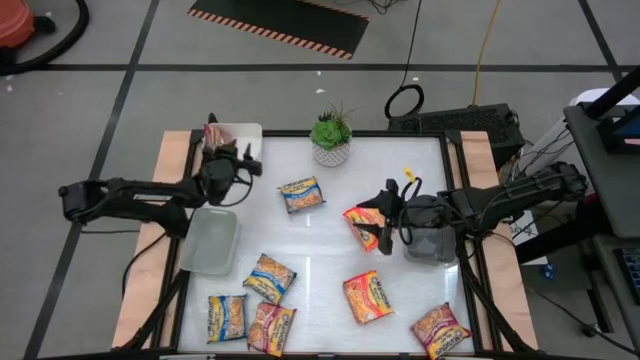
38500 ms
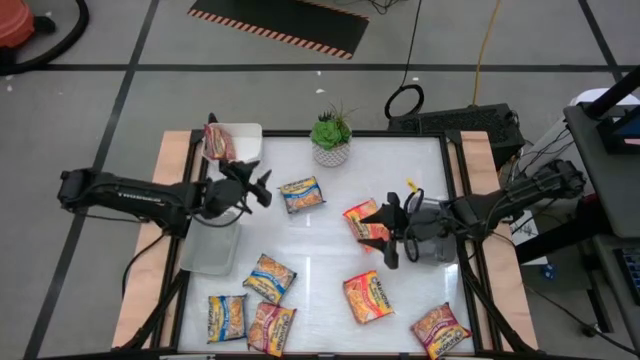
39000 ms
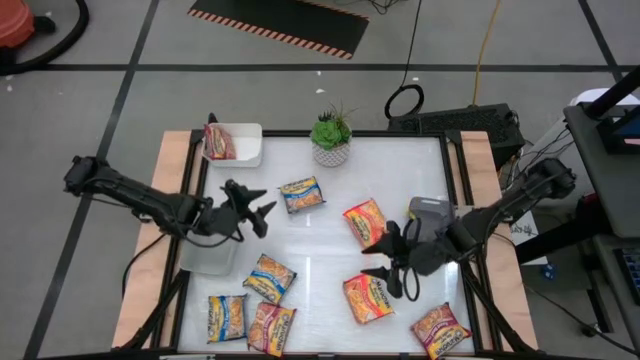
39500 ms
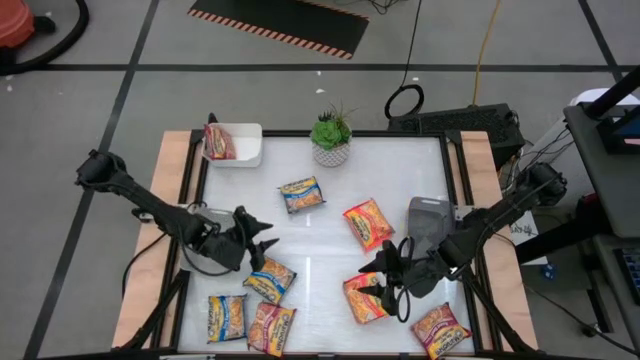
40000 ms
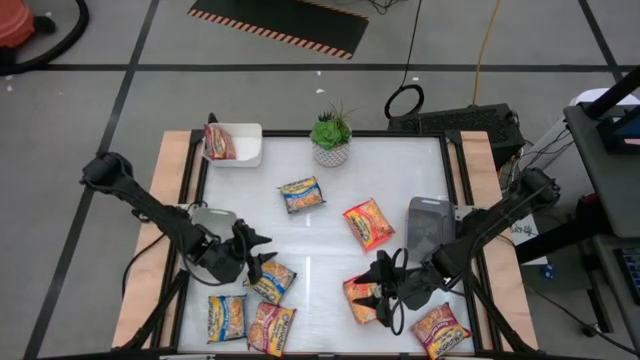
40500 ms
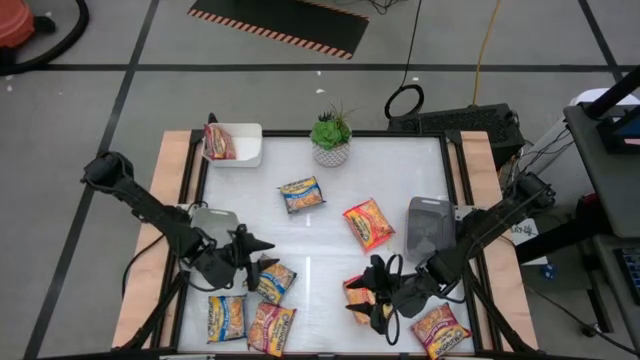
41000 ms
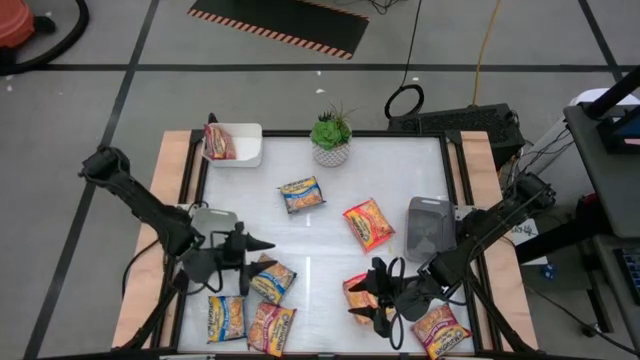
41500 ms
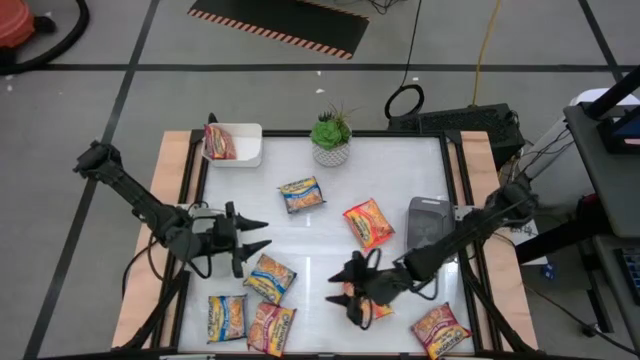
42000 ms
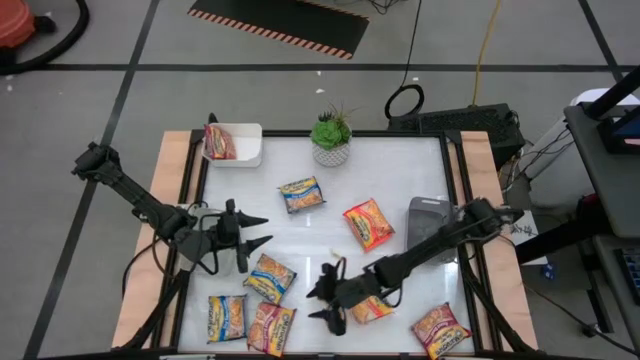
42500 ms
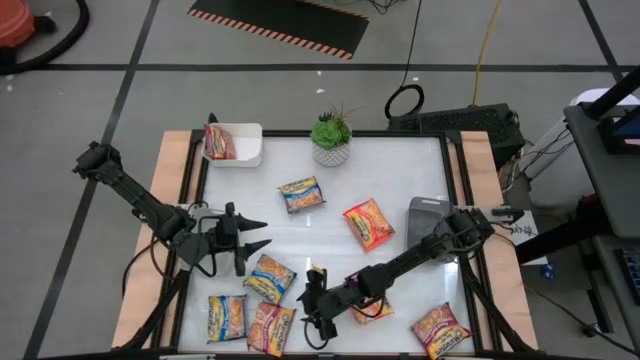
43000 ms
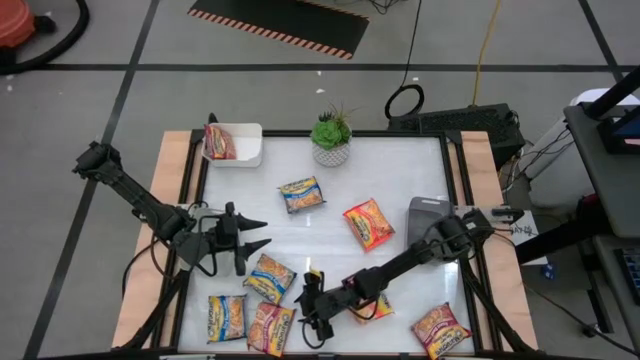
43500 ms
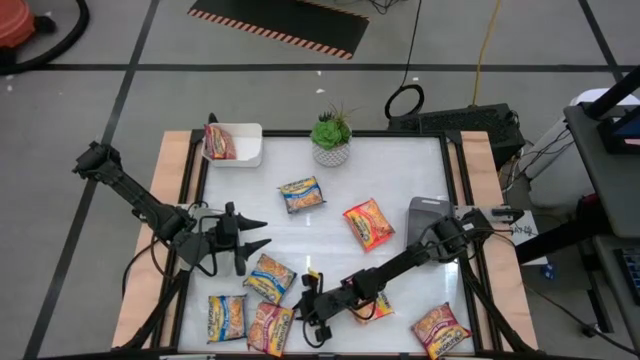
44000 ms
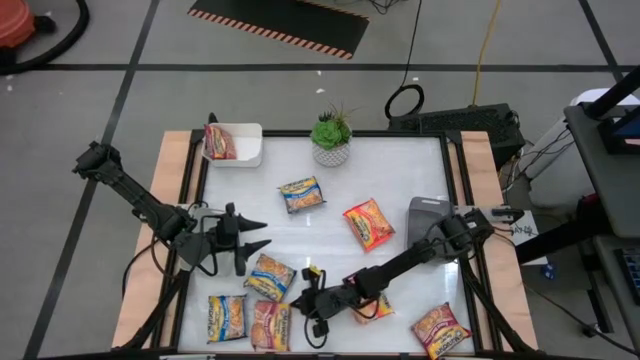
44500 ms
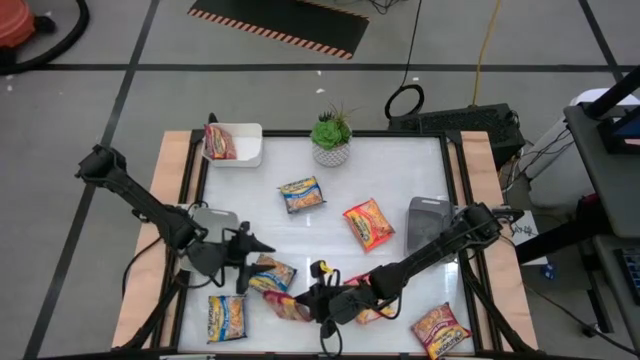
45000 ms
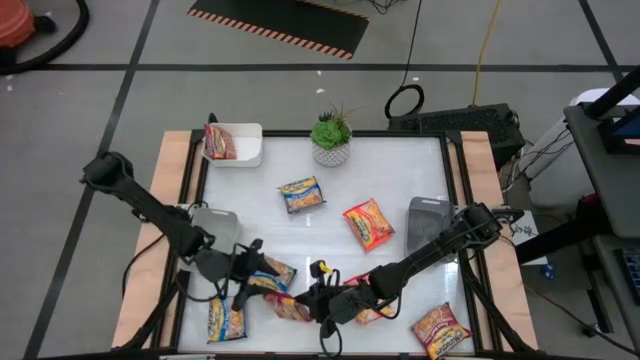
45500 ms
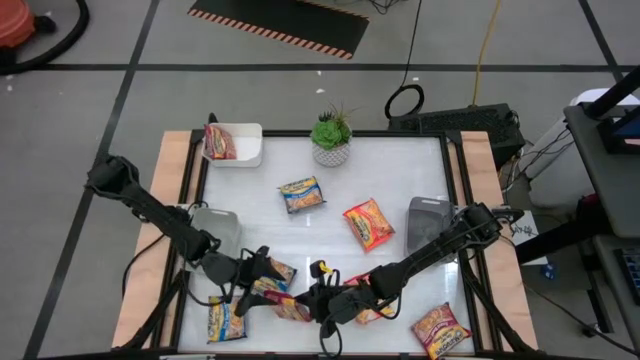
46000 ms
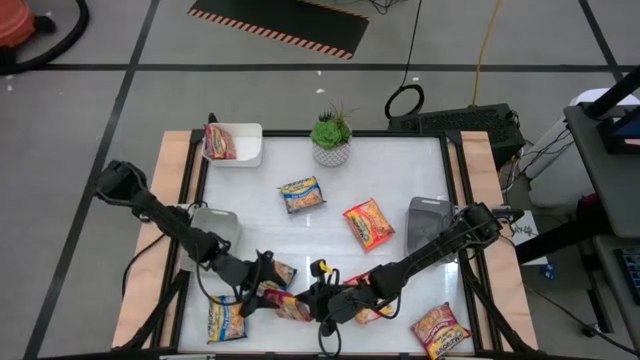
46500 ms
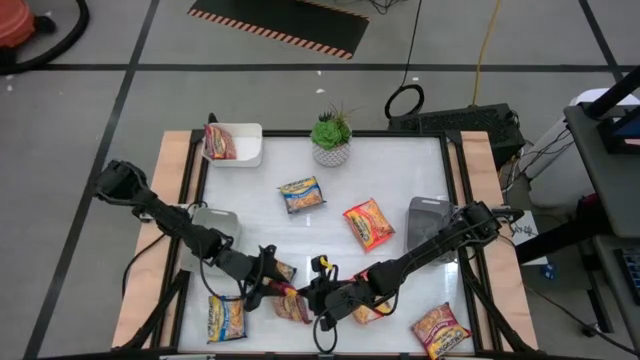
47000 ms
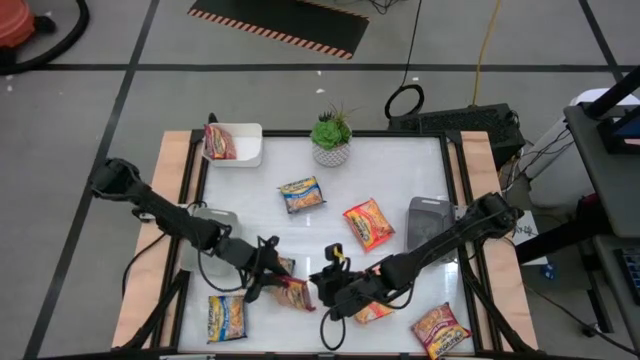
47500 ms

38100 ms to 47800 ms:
Task: Sort Maruchan noodles
Put the left red noodle pack into the white bin

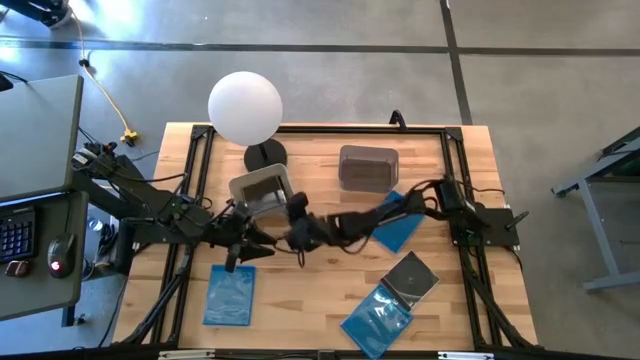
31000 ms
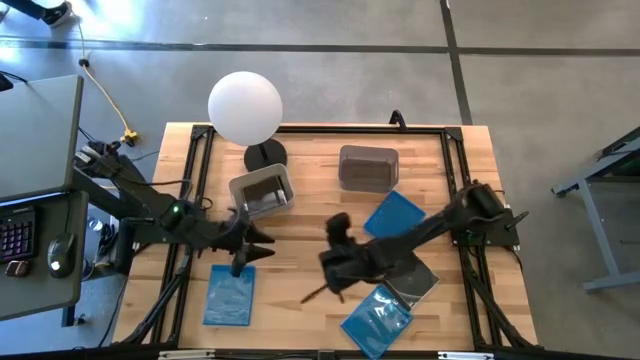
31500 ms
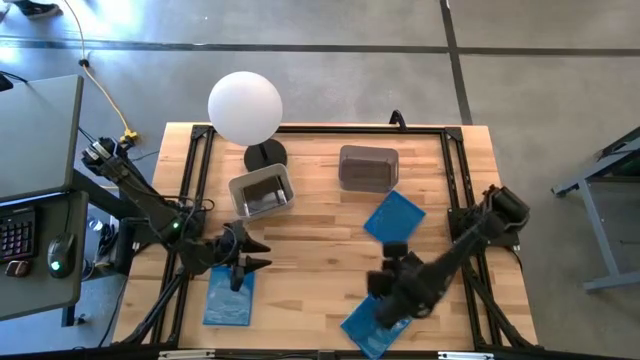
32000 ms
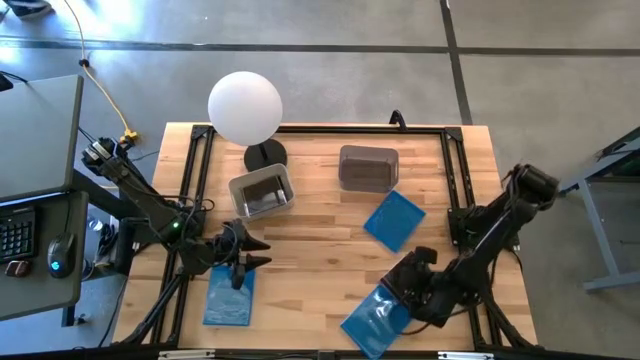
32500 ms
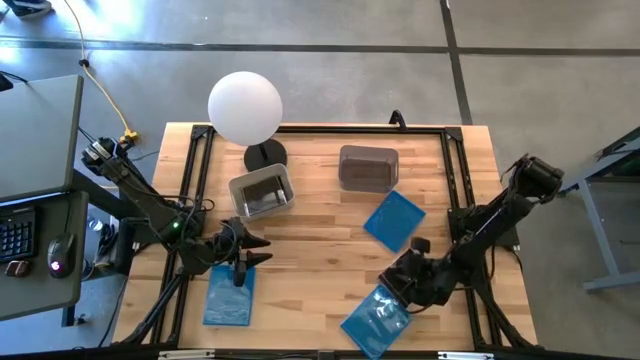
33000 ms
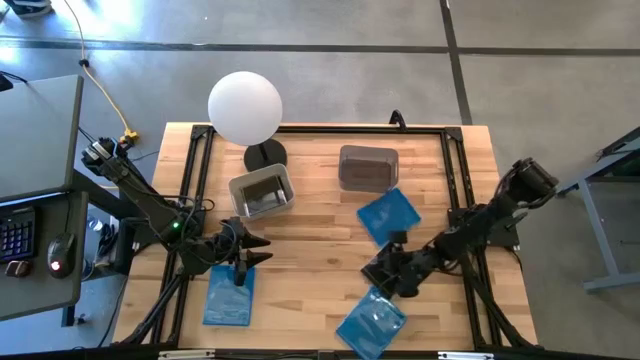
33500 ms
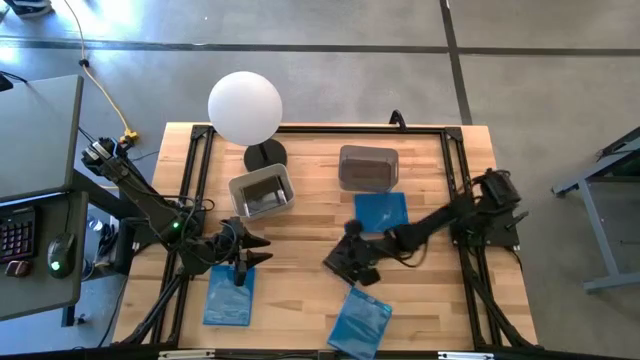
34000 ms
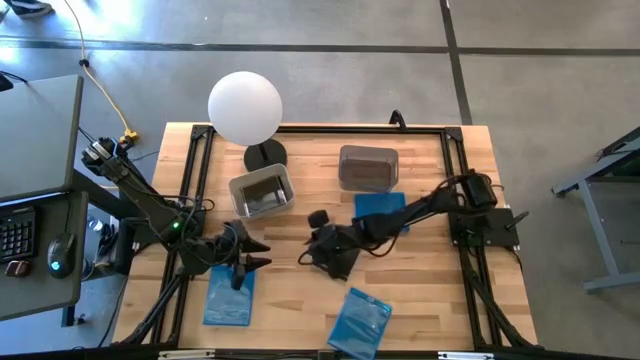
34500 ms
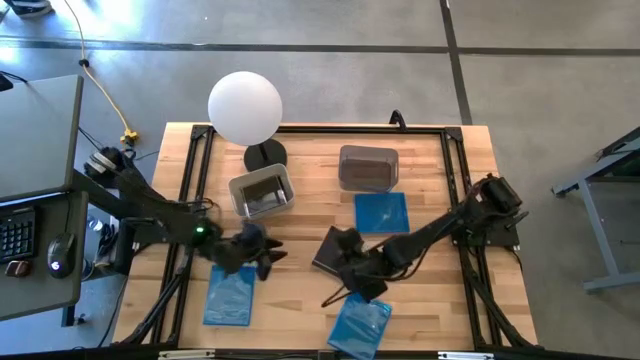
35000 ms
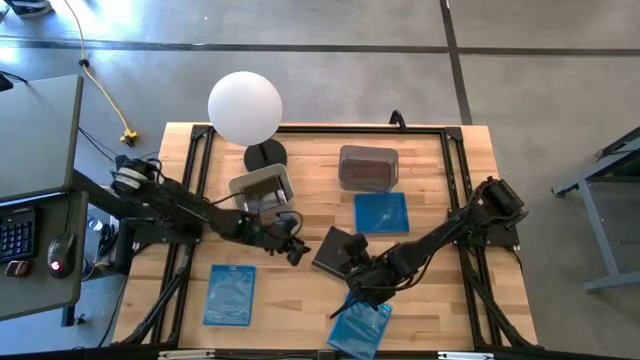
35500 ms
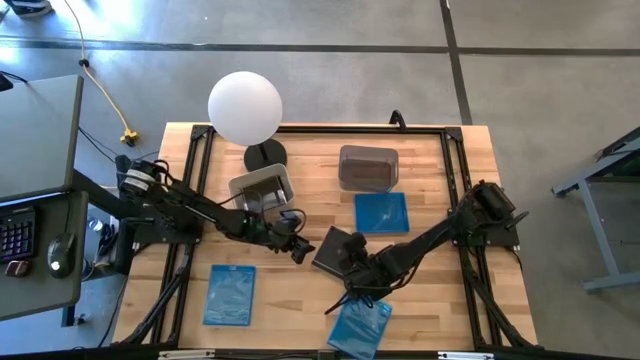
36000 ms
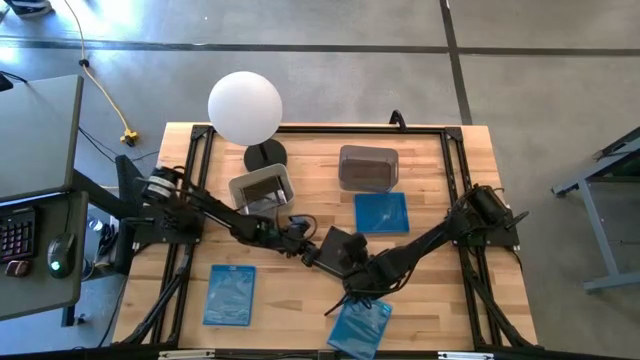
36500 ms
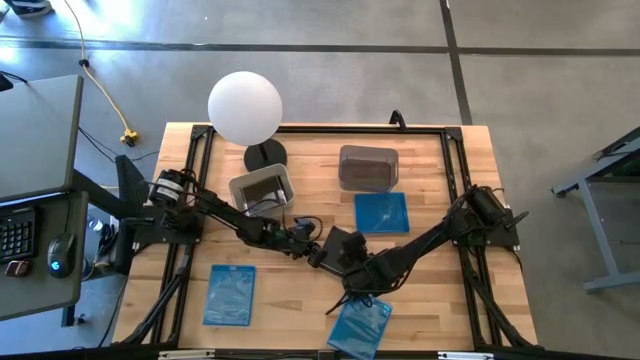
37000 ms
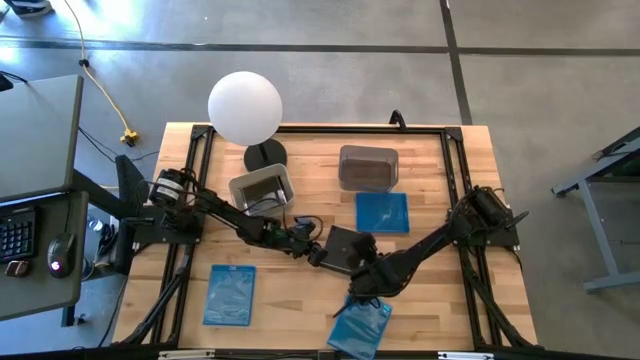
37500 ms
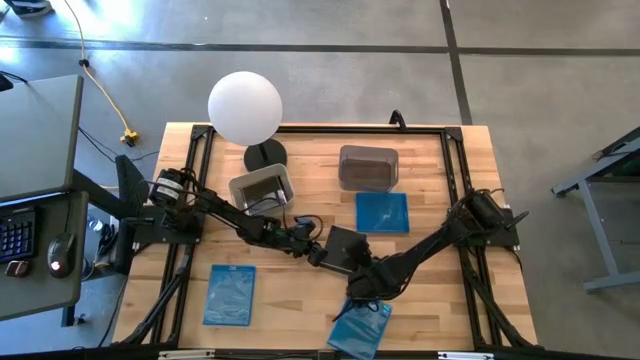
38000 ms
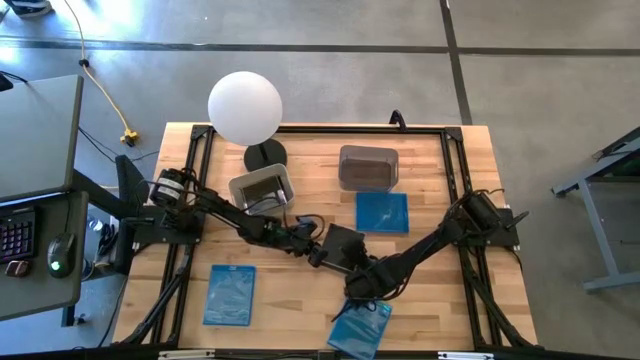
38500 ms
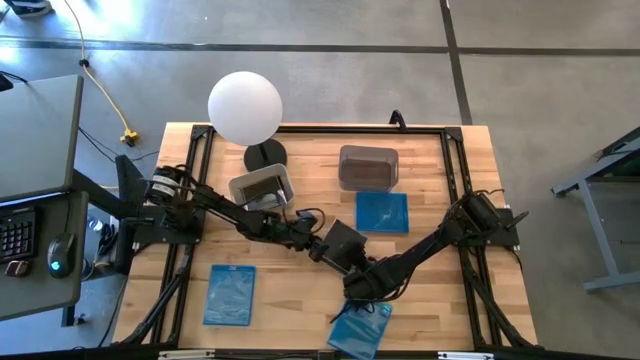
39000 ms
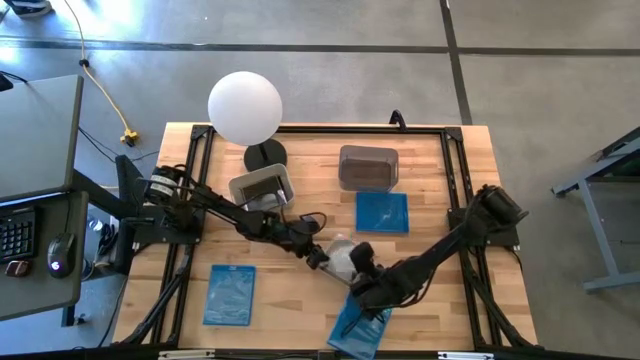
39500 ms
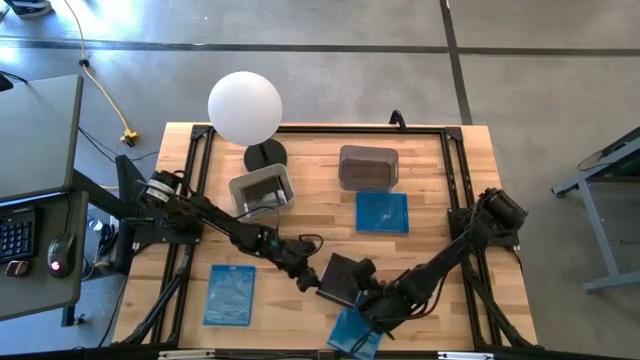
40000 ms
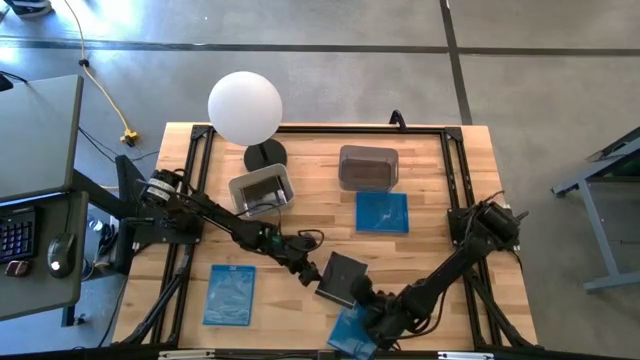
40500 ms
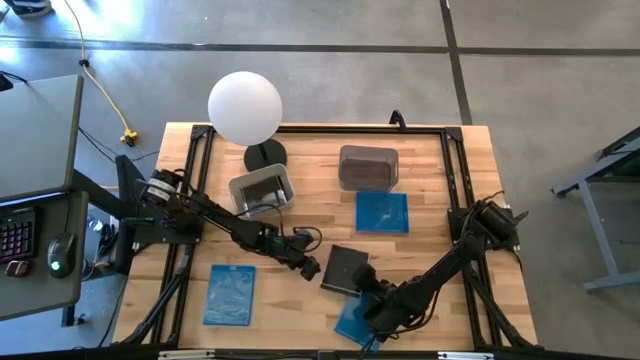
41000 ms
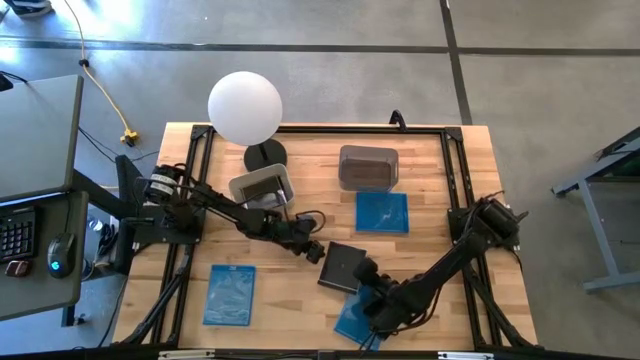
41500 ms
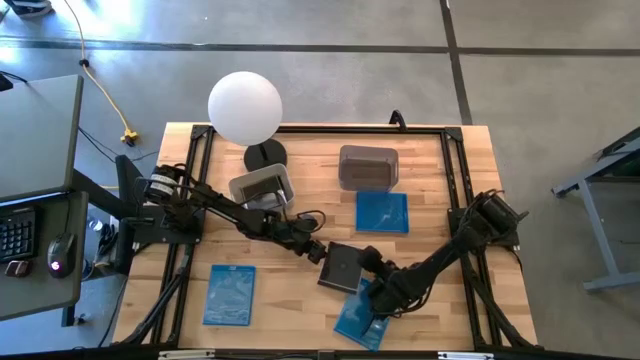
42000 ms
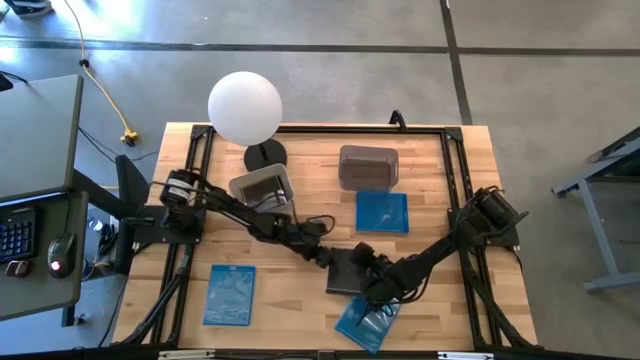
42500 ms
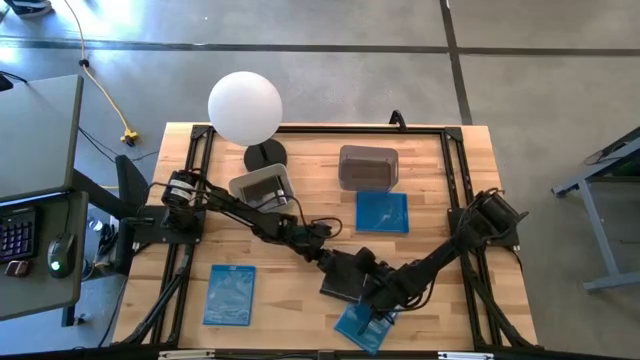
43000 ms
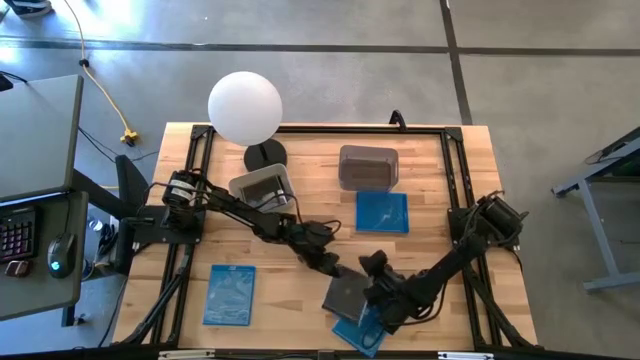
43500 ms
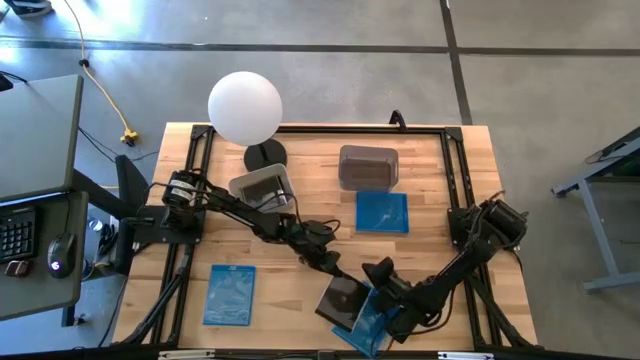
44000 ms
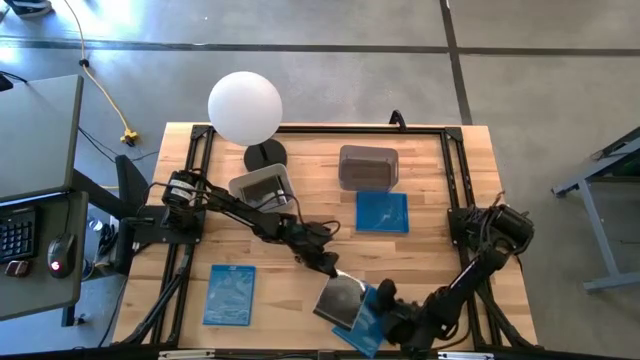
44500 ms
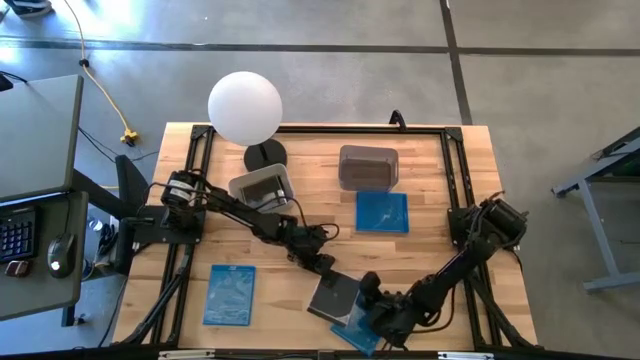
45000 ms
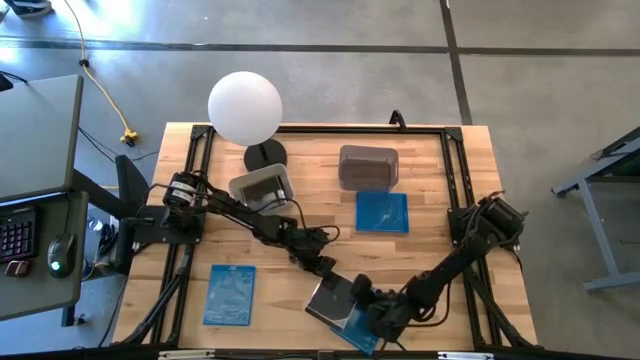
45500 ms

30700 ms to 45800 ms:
Task: Pick & place jewel cases by type
Put the black CD case into the gray bin
